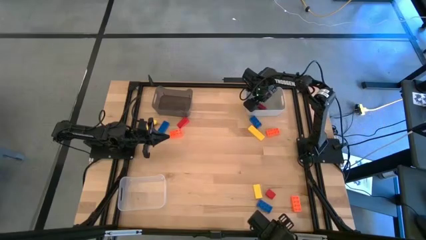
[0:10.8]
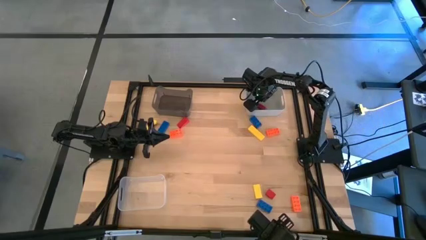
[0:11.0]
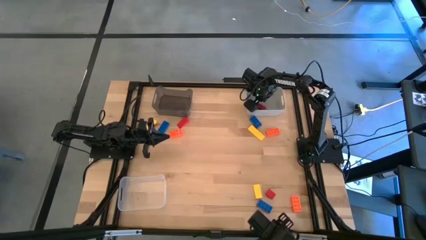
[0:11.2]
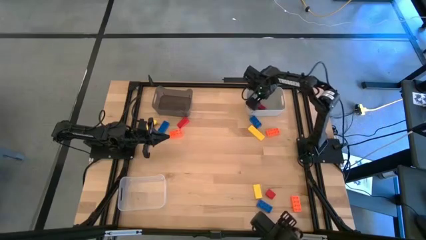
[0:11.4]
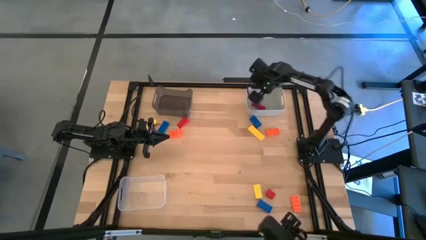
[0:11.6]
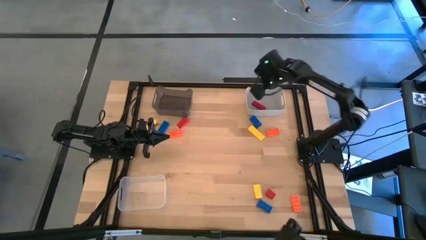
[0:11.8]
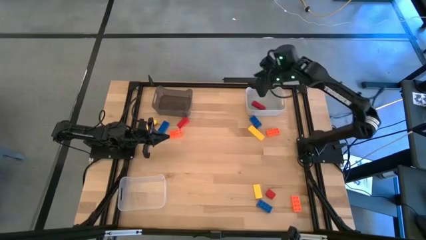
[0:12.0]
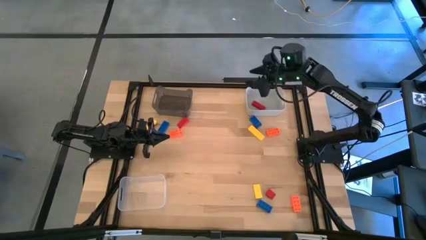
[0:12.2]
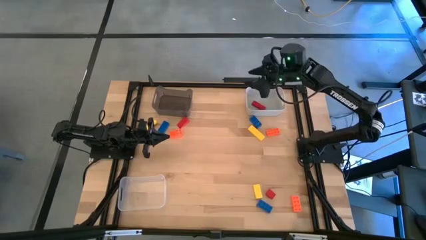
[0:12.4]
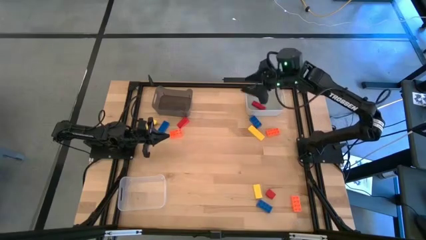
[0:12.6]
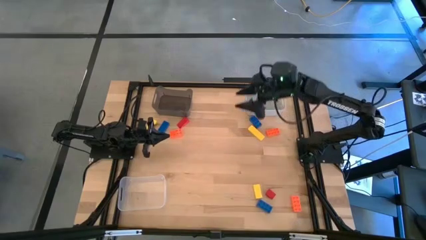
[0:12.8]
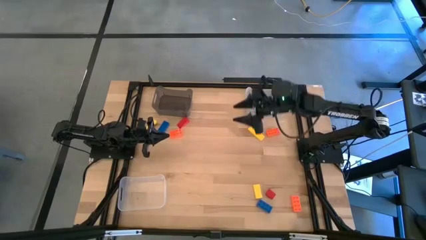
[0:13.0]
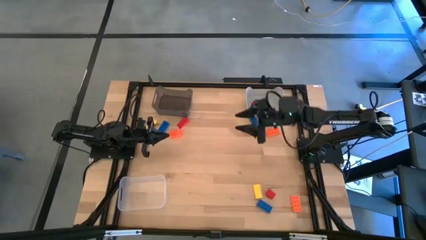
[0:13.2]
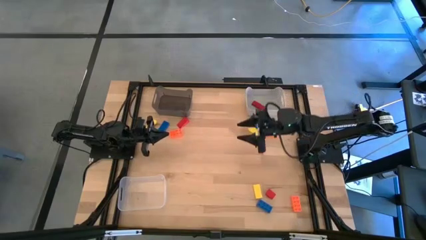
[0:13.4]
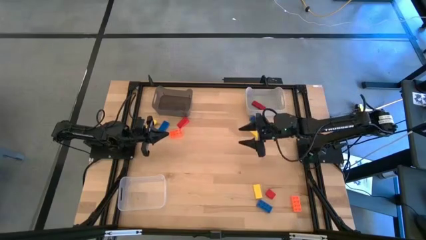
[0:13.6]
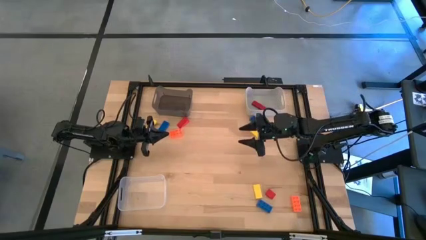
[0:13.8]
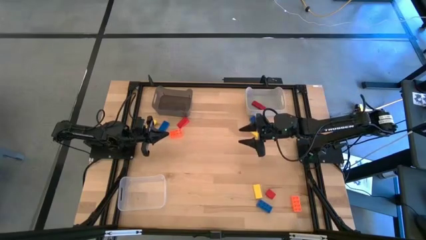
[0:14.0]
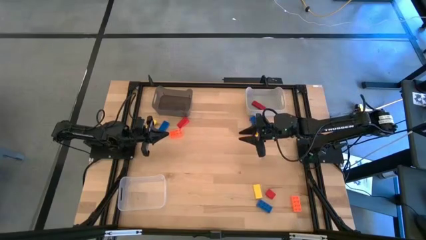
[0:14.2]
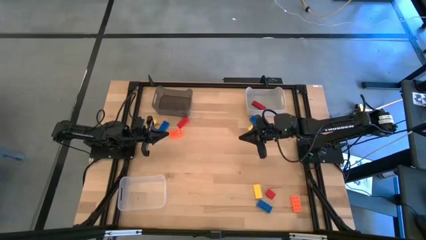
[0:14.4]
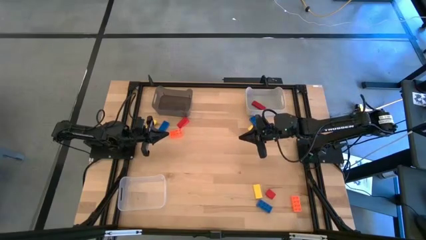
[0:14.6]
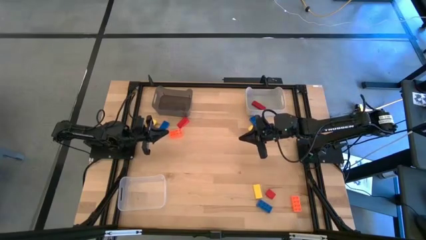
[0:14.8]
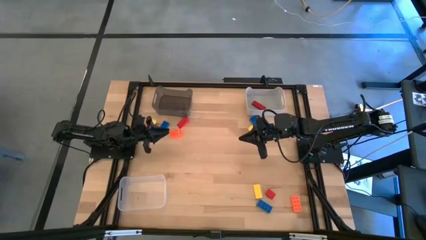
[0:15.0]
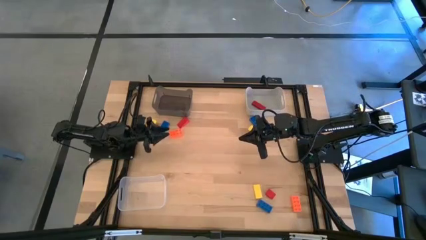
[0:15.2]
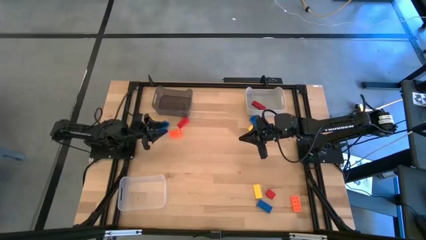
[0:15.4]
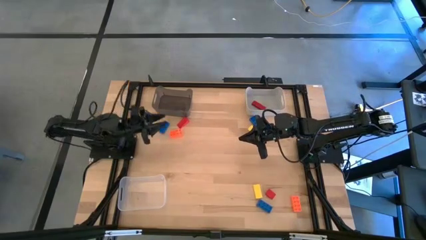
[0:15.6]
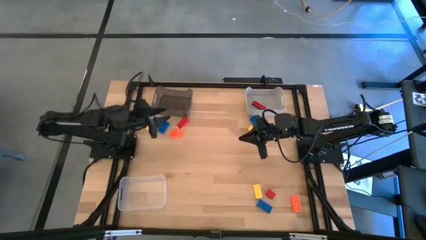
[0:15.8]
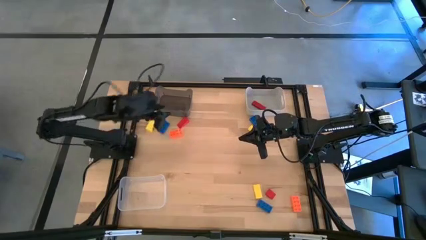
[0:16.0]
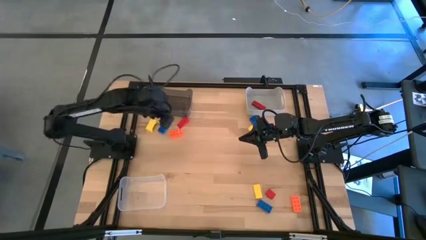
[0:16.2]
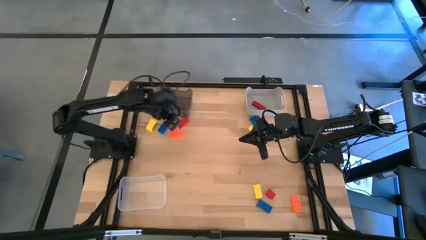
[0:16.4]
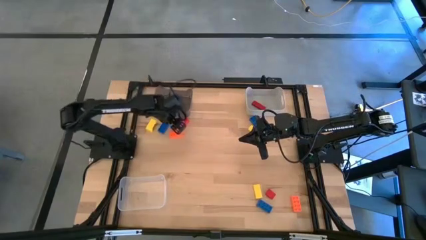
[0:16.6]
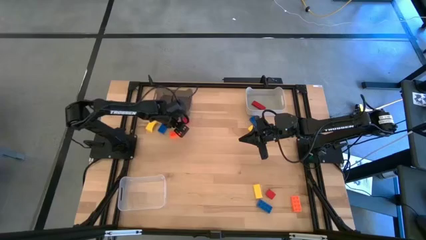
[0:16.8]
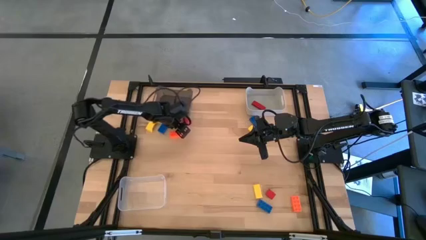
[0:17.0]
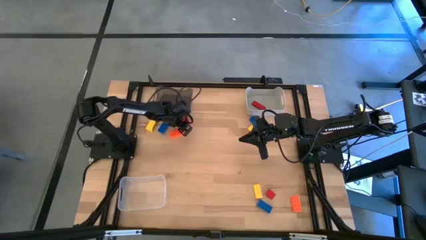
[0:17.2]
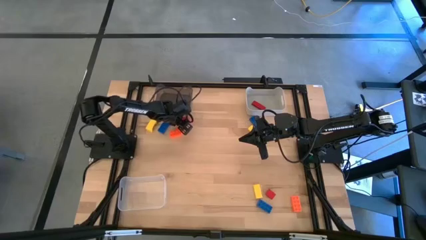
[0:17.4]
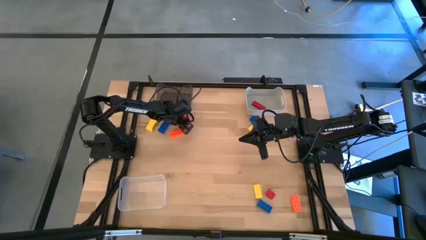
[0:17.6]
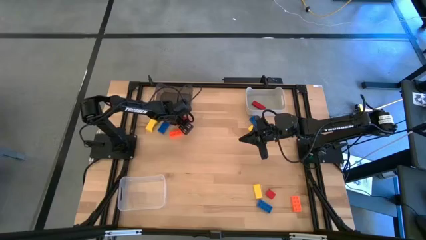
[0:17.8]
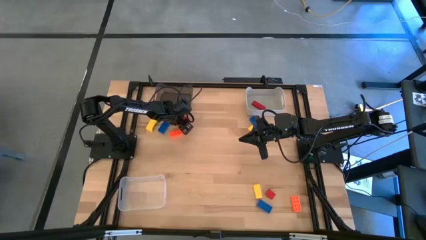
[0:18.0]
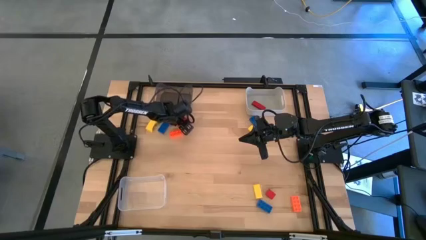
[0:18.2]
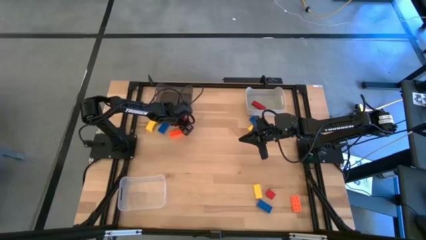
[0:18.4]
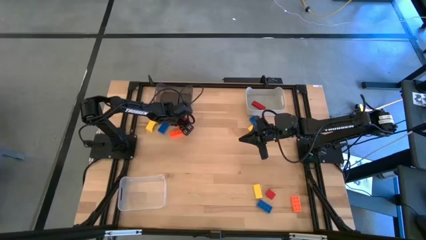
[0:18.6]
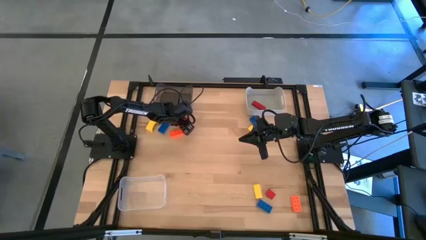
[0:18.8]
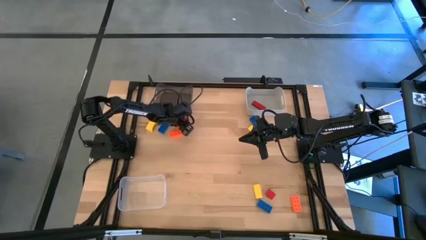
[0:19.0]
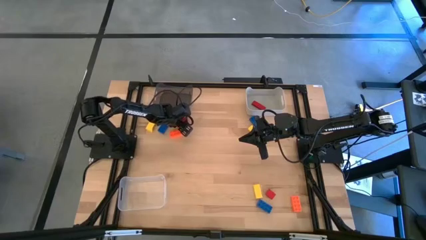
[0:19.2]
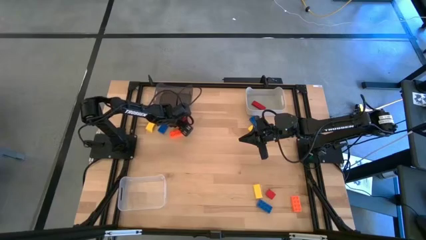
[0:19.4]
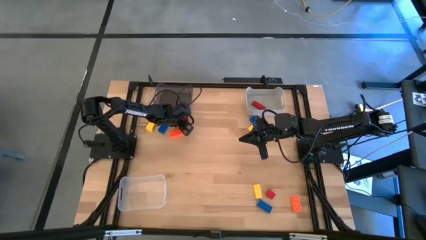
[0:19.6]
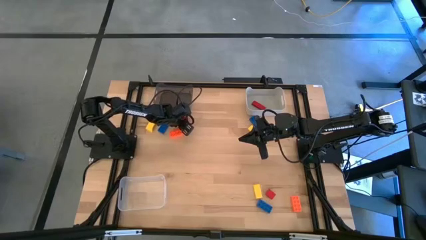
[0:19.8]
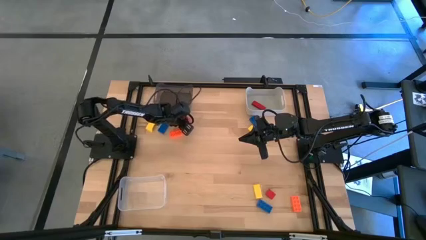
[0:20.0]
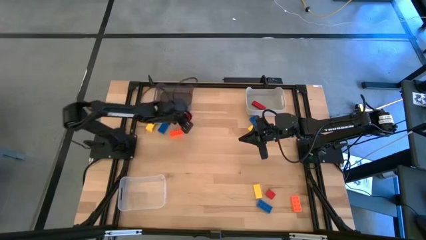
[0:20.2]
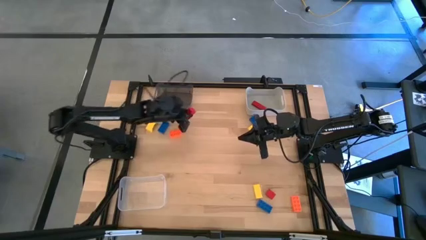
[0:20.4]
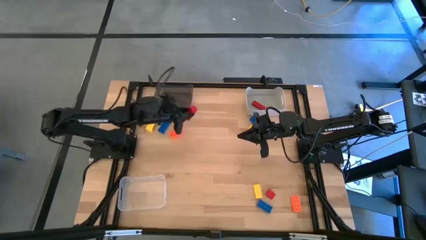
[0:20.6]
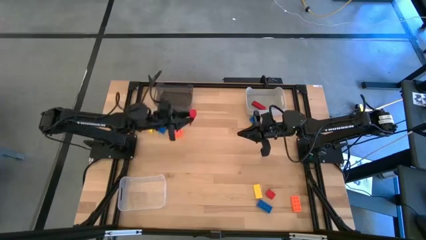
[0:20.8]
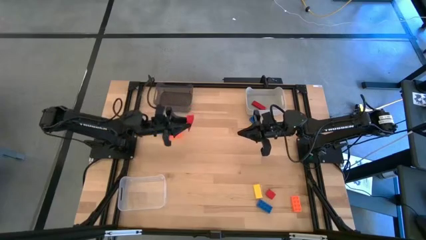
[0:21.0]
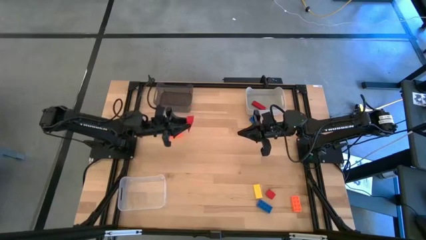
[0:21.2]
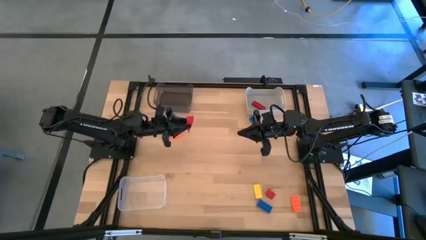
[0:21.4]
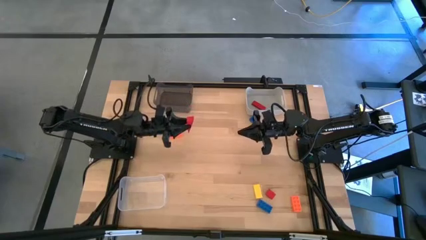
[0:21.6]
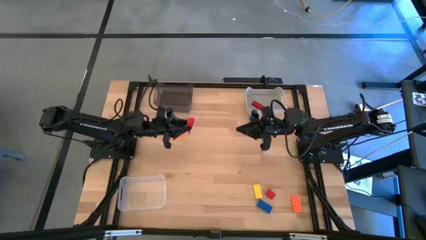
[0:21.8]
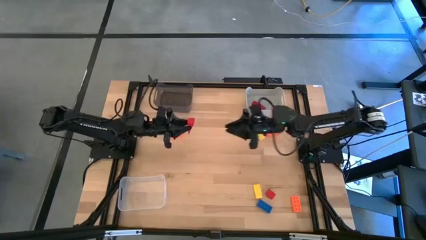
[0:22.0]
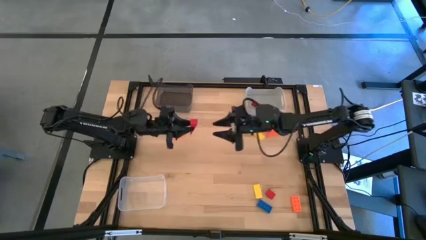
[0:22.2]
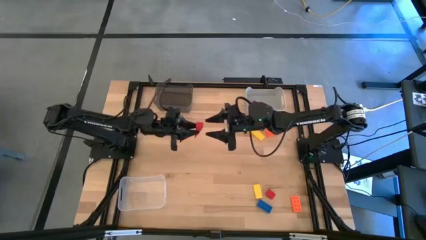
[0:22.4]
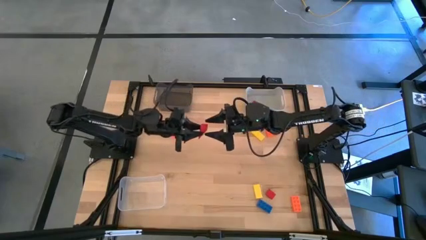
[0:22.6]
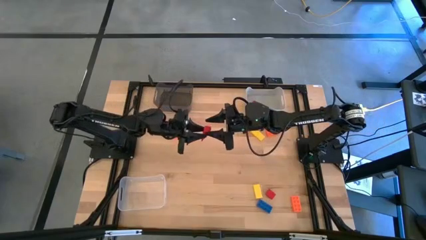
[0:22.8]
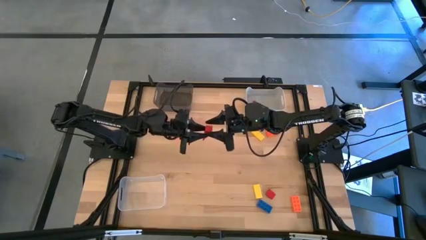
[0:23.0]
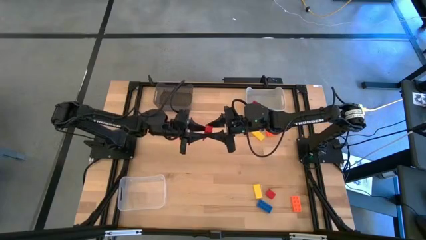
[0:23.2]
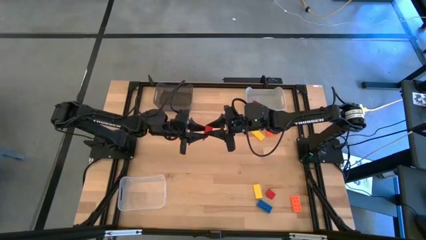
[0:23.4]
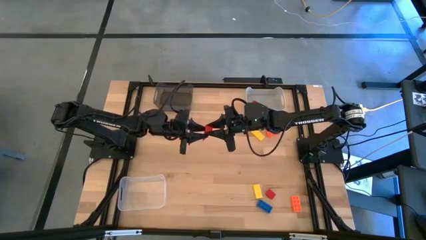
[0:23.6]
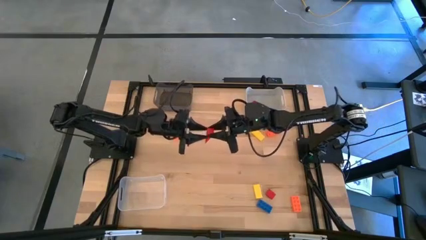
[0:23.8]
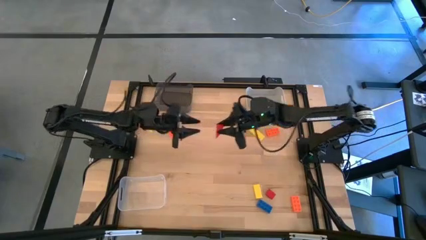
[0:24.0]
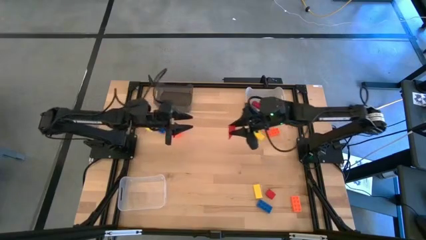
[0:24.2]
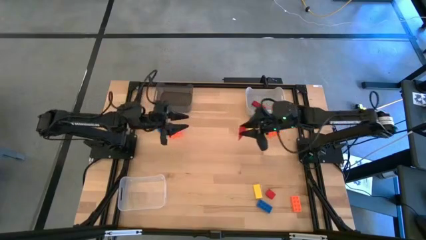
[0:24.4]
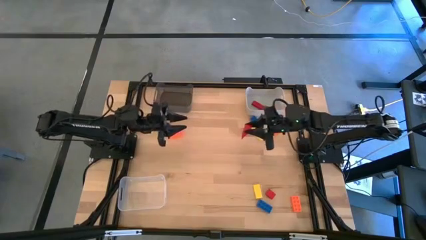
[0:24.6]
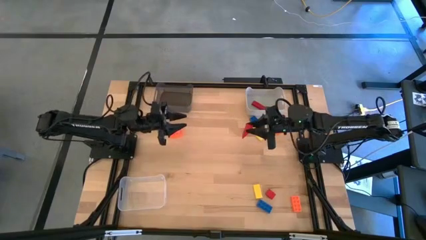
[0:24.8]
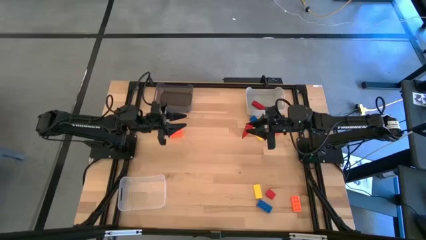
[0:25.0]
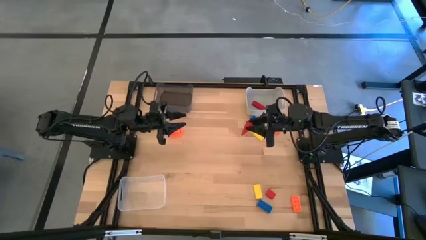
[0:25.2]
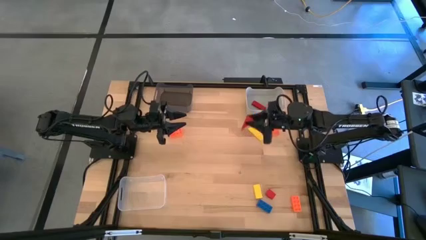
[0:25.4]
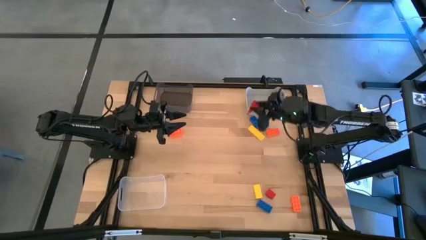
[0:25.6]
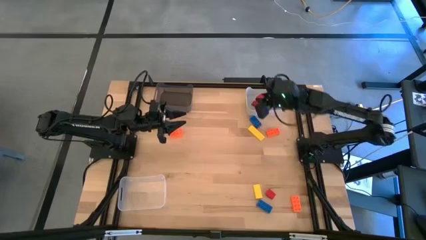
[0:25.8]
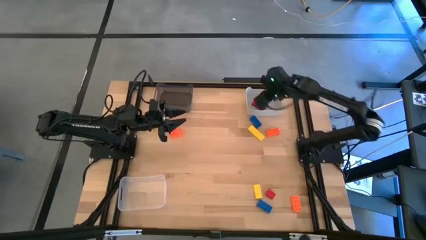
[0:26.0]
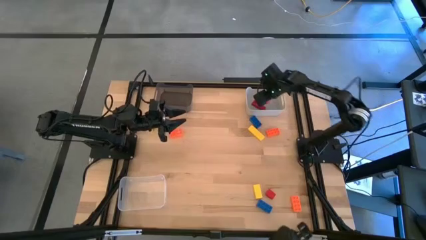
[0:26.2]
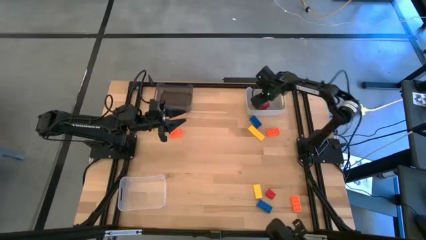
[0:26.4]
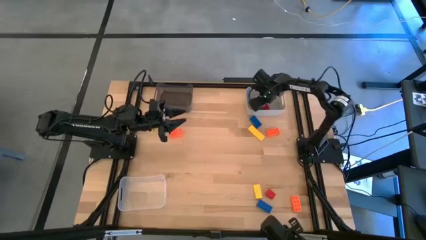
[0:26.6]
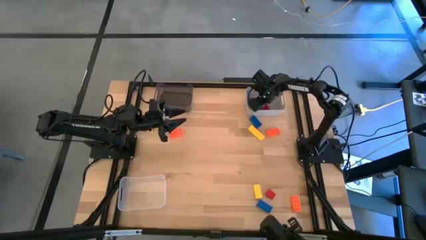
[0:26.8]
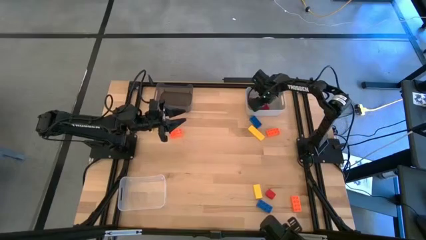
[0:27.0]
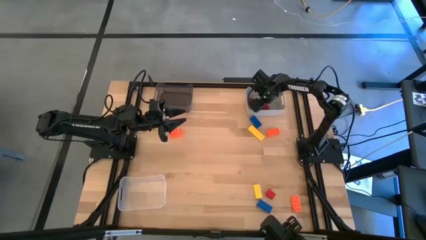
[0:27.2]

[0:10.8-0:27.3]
Task: Sort & place blocks by color
Put the red triangular block into the gray bin
